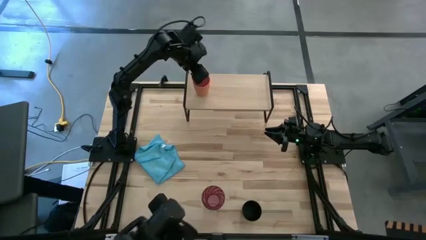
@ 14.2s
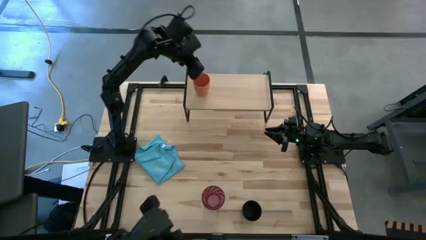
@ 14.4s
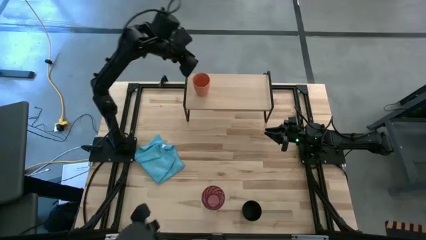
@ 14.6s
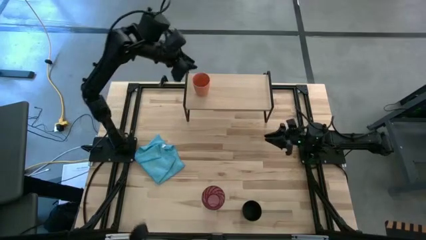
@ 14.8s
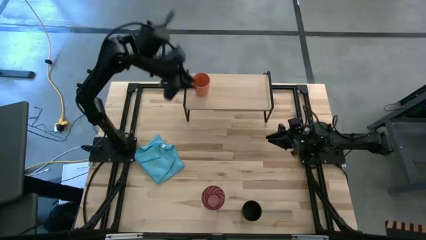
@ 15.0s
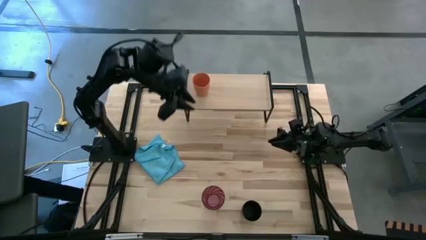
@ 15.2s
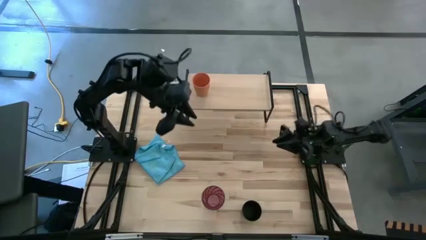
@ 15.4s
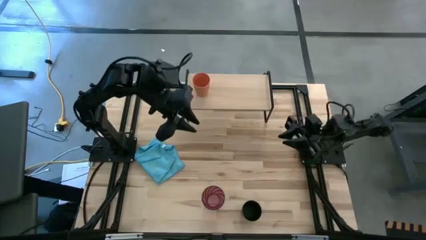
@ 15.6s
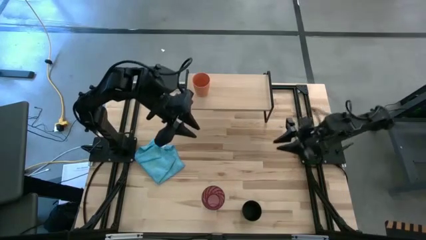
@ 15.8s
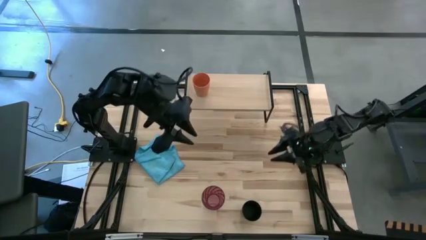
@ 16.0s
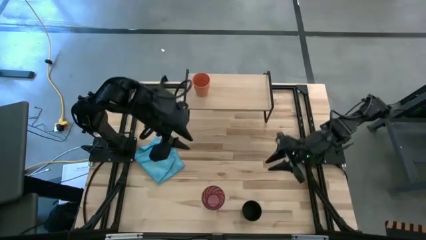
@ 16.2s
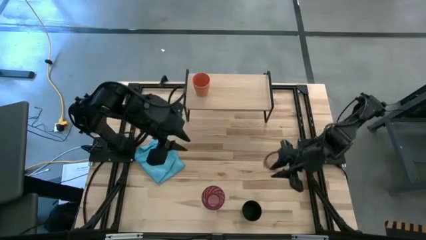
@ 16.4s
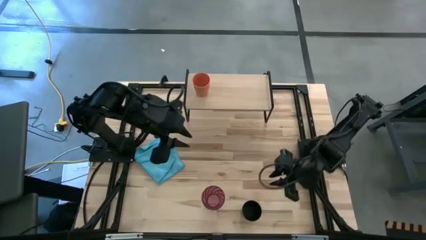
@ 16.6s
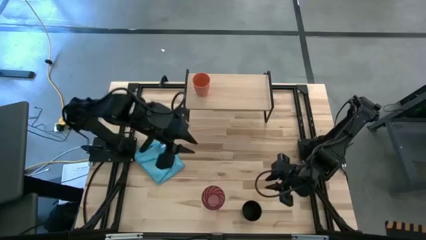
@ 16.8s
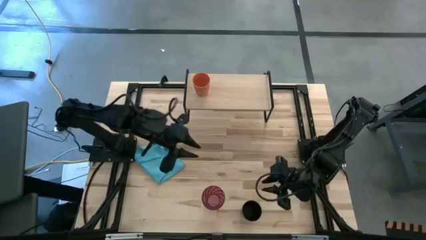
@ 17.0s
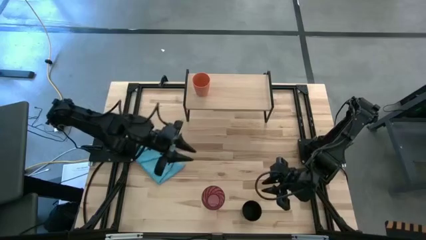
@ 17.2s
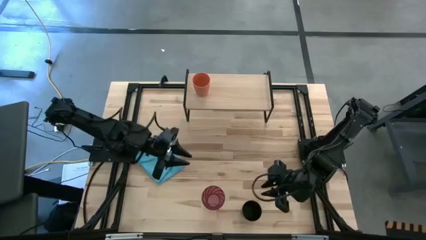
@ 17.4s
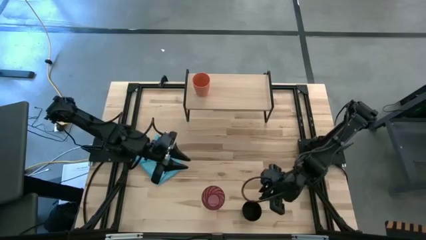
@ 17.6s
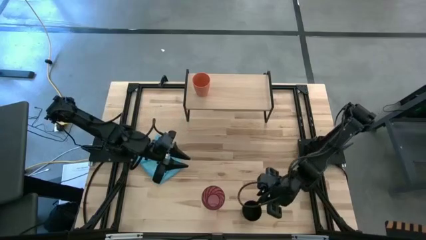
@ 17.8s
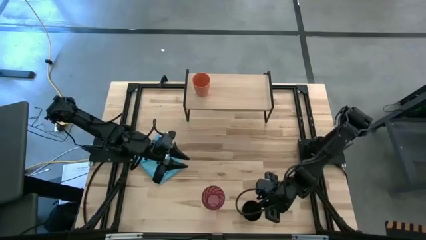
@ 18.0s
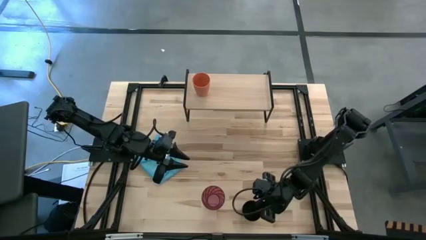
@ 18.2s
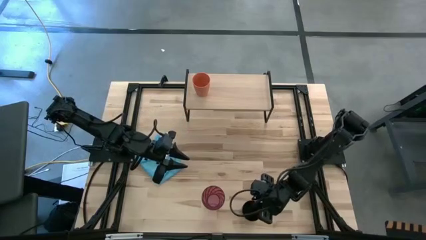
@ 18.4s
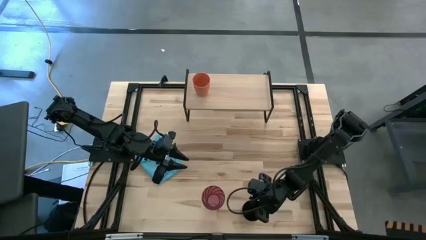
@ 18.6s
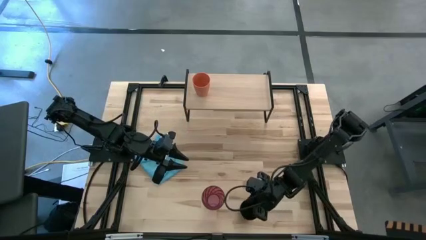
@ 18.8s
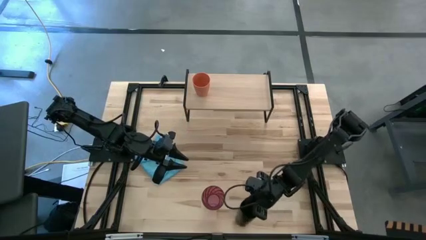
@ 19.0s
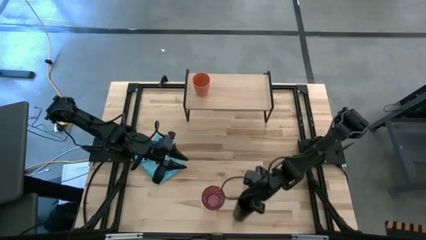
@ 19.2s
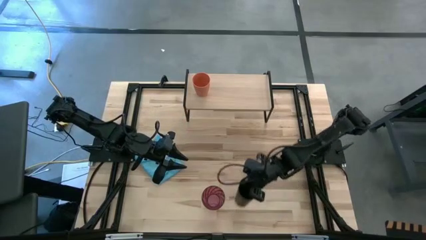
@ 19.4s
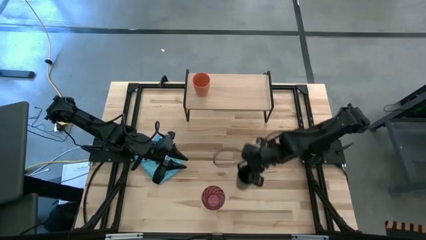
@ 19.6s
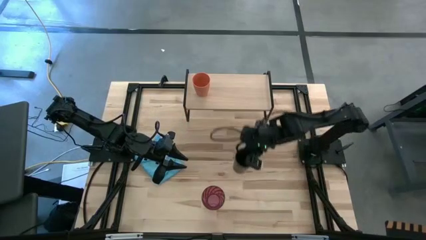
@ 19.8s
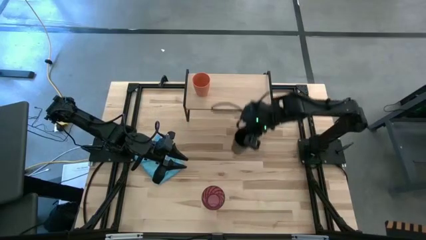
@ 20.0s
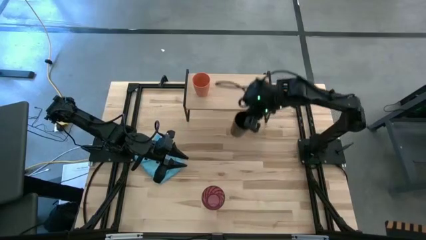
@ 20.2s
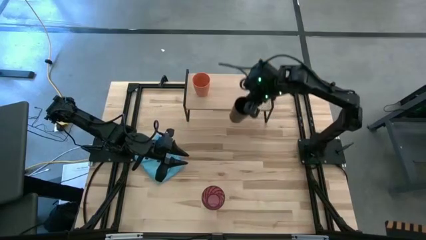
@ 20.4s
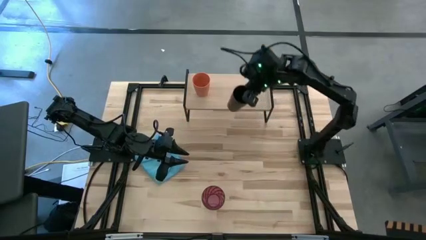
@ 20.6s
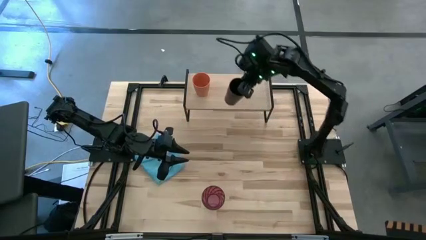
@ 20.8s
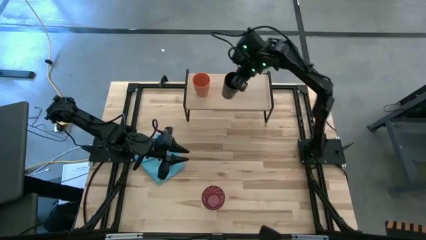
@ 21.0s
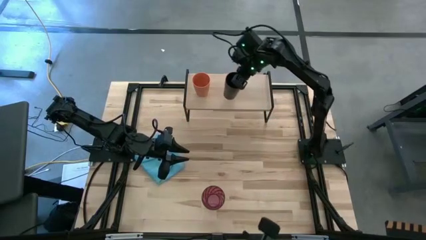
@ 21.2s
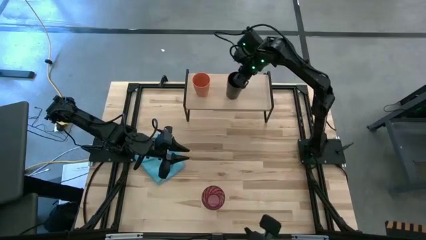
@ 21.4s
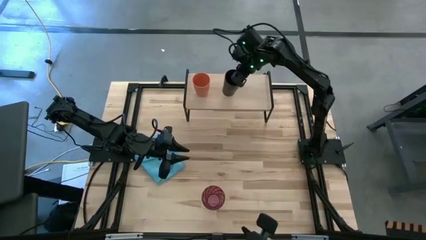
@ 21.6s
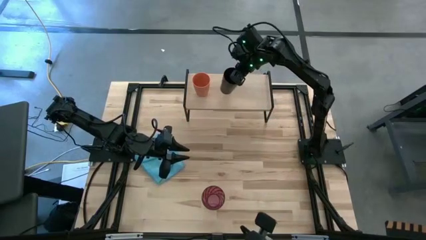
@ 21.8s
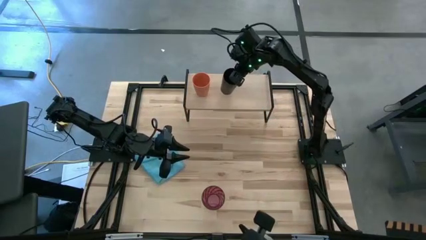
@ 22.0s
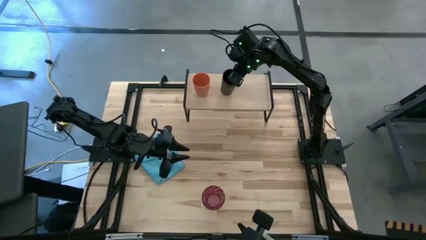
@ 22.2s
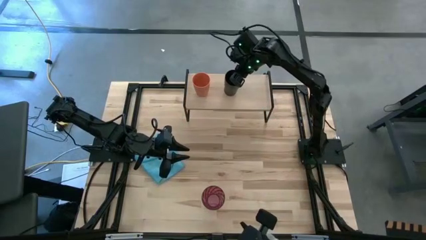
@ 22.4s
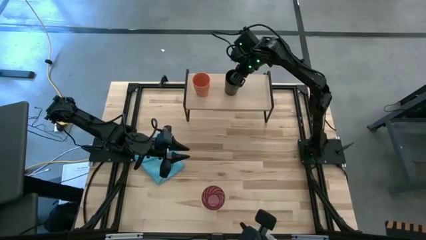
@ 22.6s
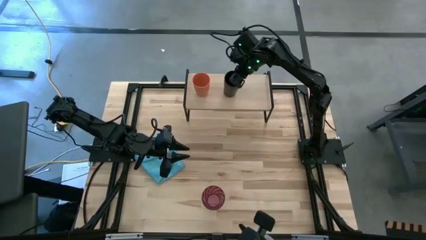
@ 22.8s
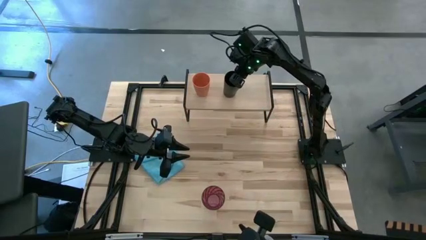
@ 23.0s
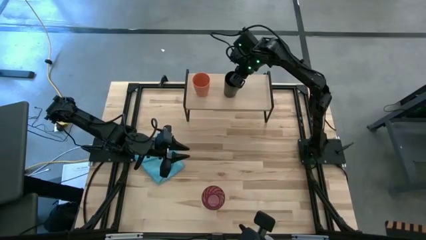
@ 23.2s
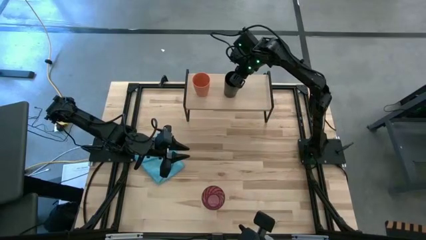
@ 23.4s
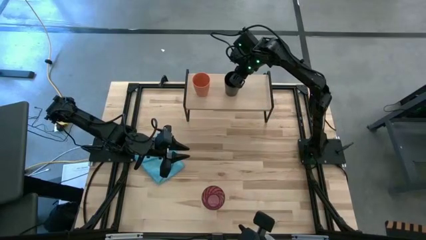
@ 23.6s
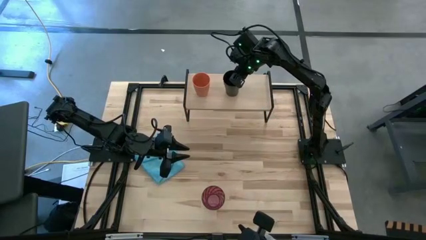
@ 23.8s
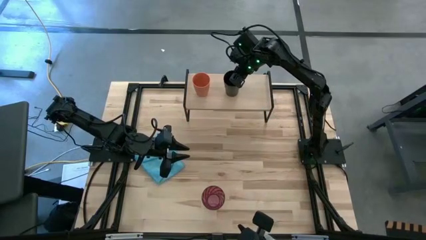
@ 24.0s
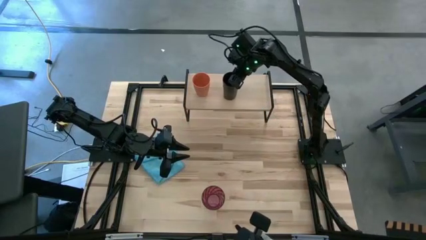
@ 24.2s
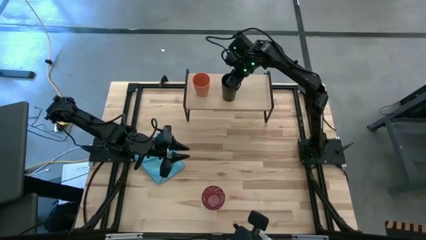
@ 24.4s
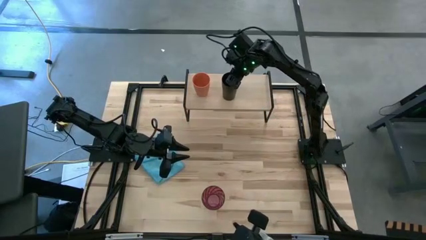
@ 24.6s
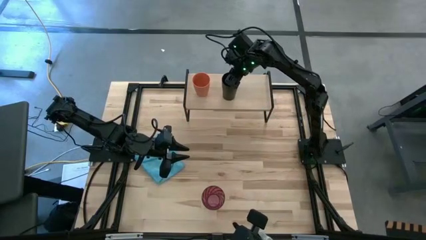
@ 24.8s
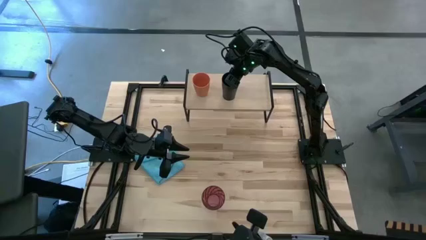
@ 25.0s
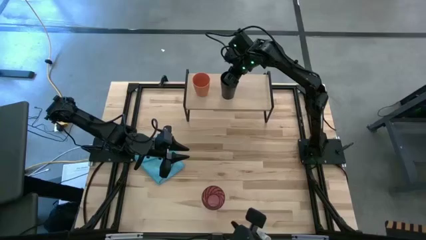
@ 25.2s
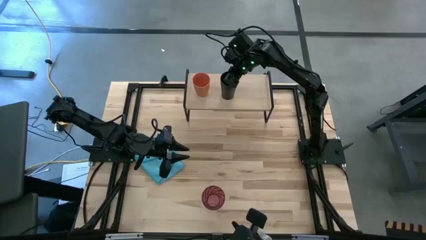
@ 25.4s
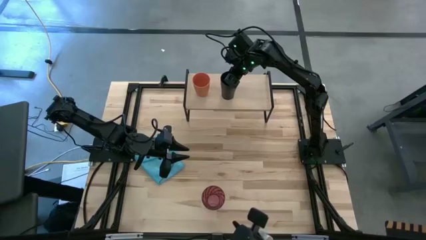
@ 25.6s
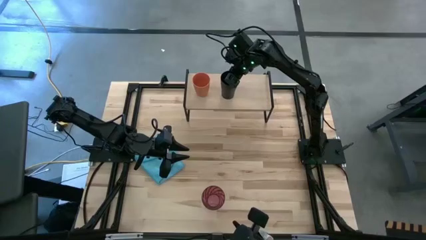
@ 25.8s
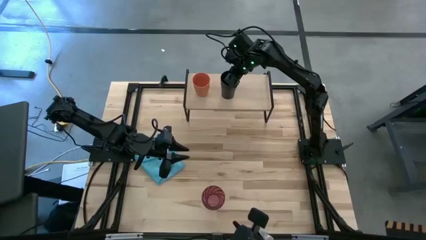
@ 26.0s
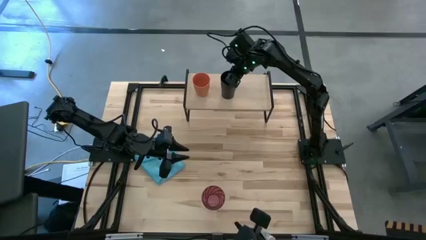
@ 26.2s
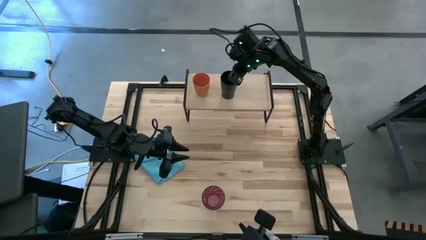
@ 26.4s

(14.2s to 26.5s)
Task: Stack small to large cups/mugs on shelf
Put the black cup on the shelf
